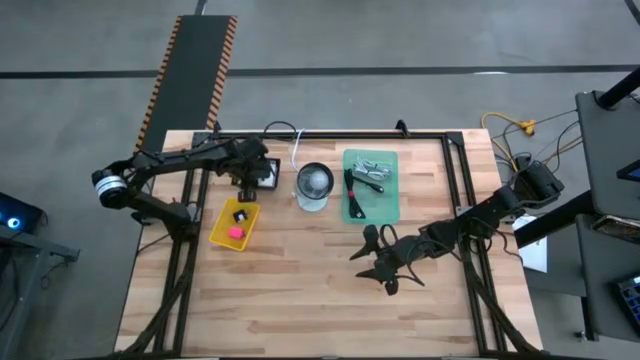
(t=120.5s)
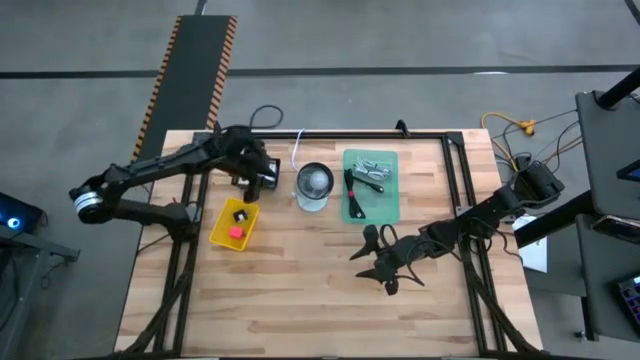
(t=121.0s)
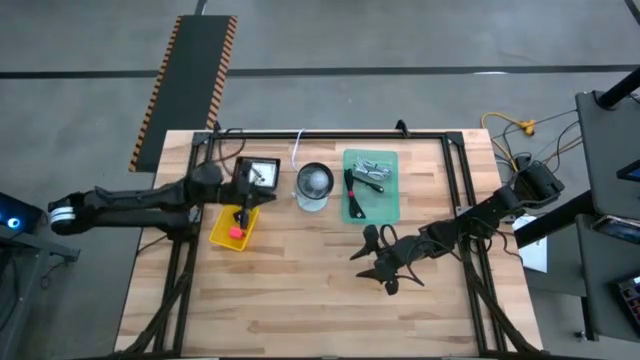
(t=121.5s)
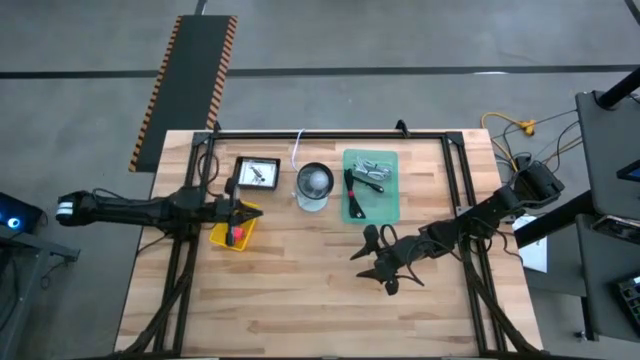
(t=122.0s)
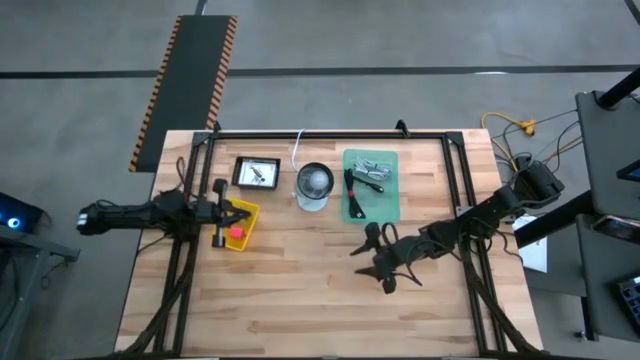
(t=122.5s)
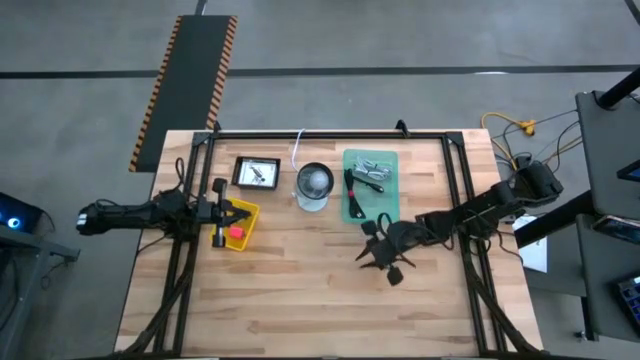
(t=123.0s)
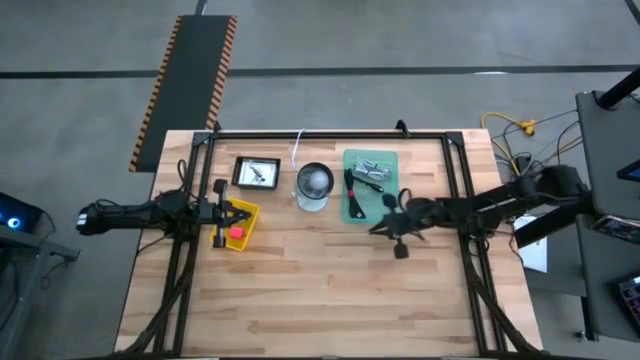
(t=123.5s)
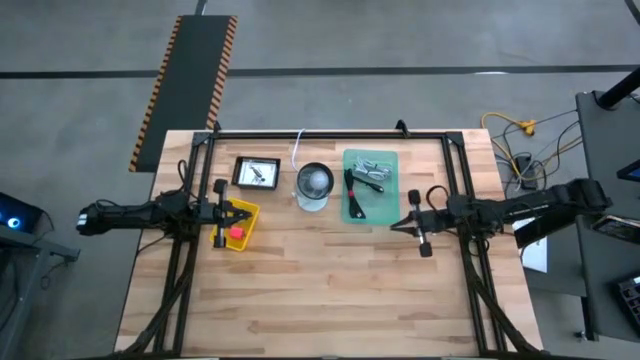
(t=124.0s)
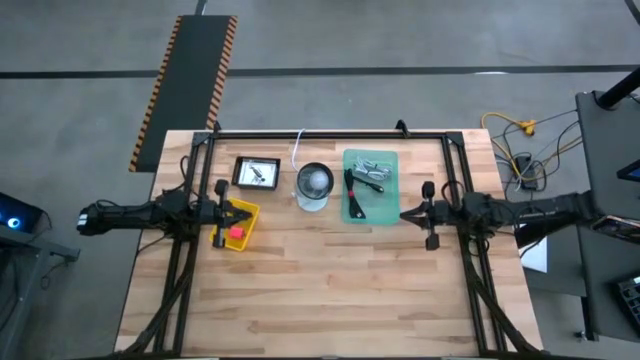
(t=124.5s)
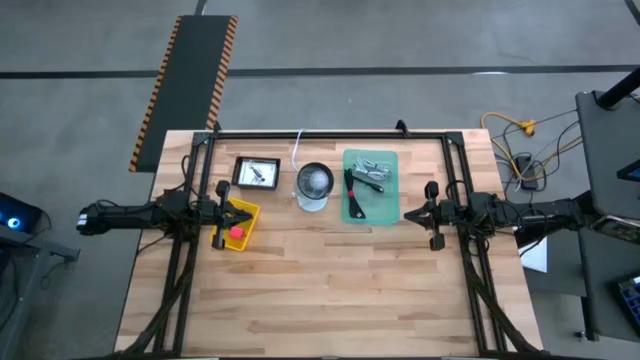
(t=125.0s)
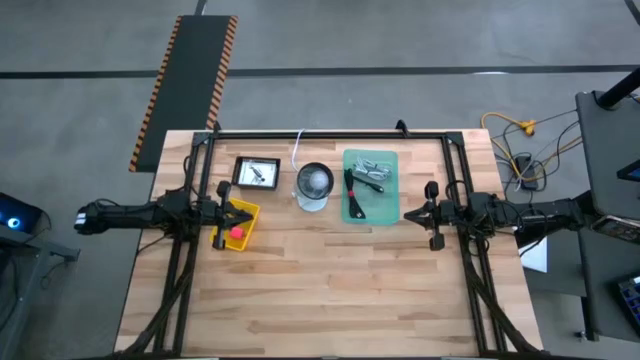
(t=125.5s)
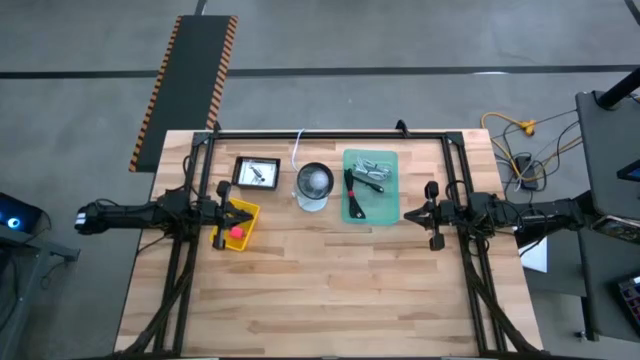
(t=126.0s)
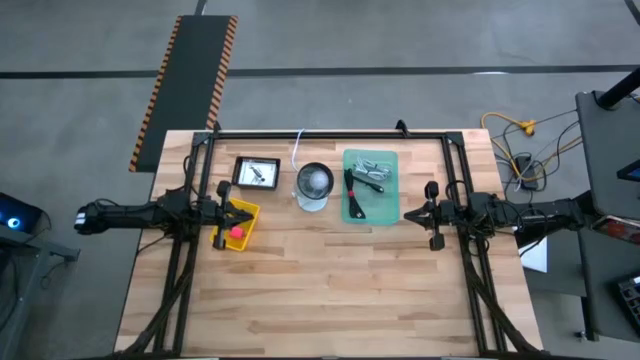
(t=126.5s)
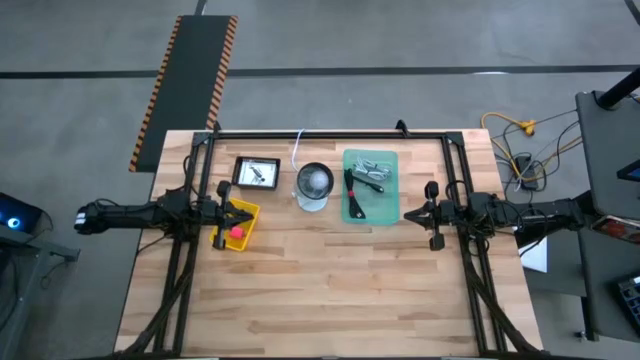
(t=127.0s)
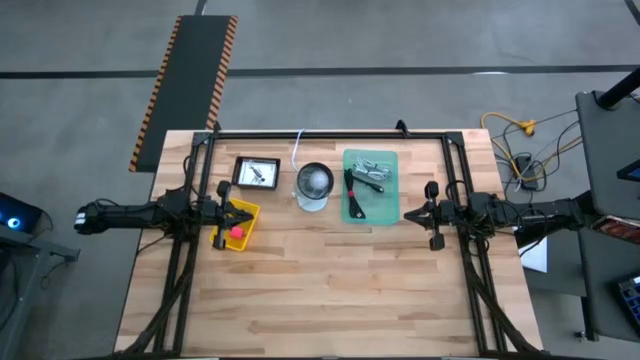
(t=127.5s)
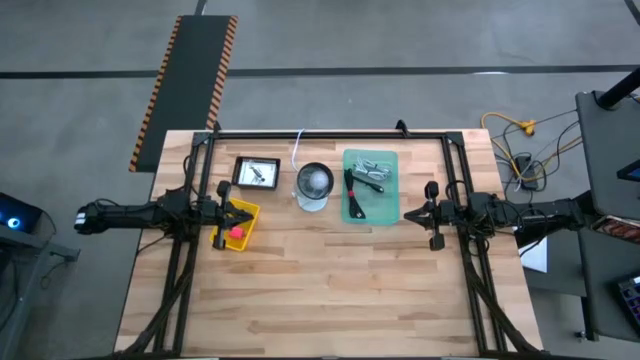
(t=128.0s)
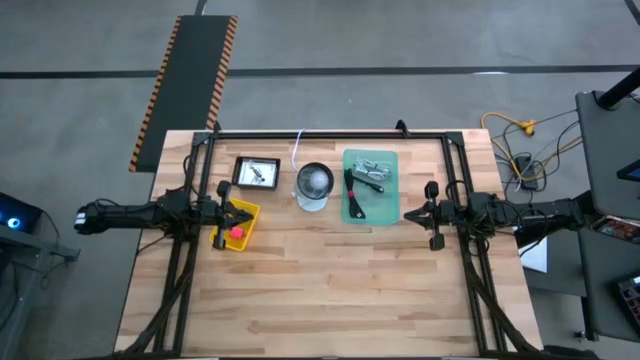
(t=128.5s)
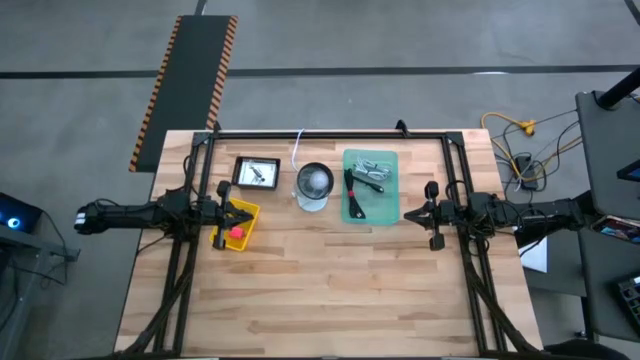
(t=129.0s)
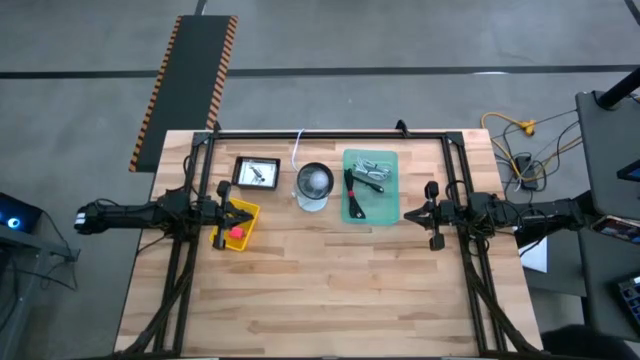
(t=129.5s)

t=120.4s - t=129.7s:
Task: Pick and place items into bin
Return to Home Position

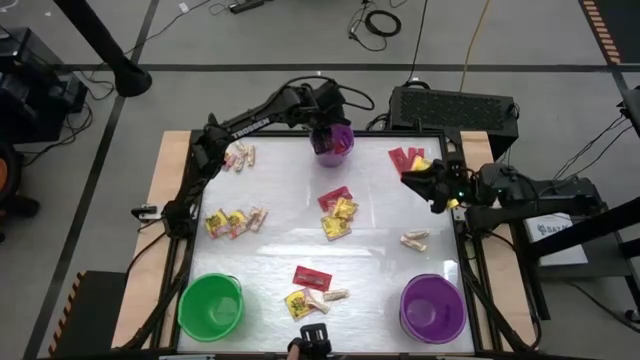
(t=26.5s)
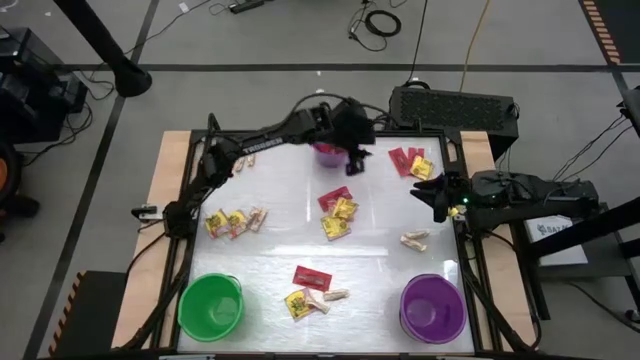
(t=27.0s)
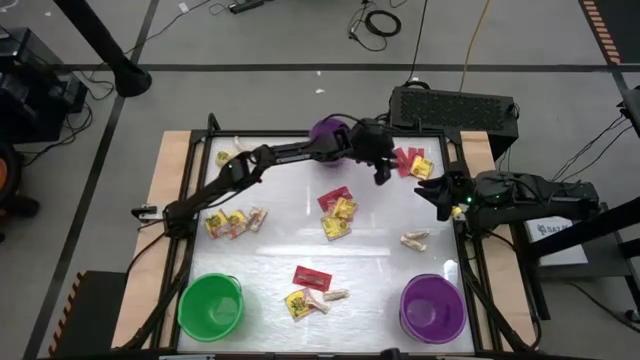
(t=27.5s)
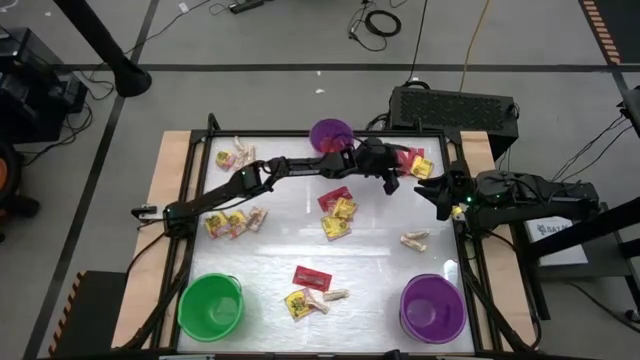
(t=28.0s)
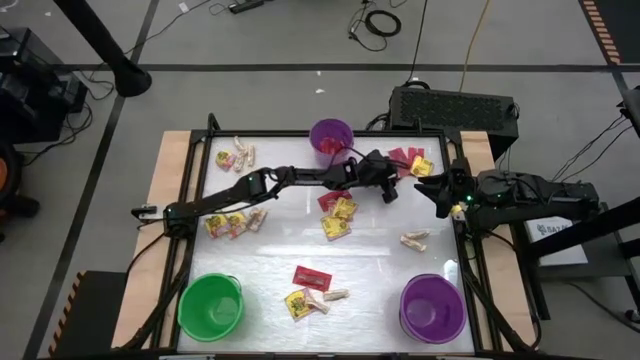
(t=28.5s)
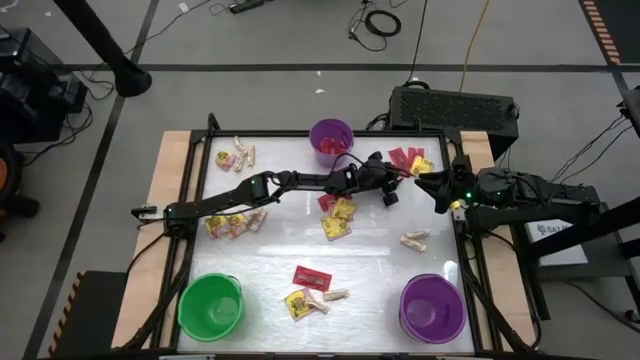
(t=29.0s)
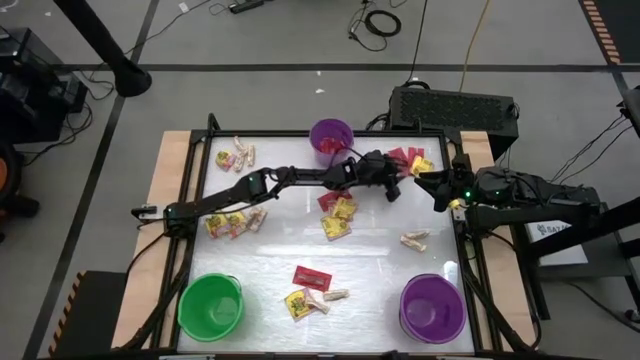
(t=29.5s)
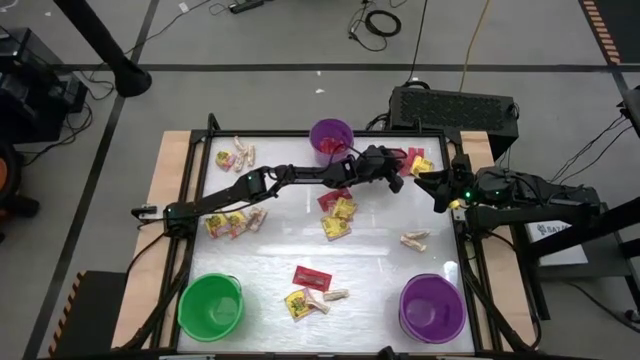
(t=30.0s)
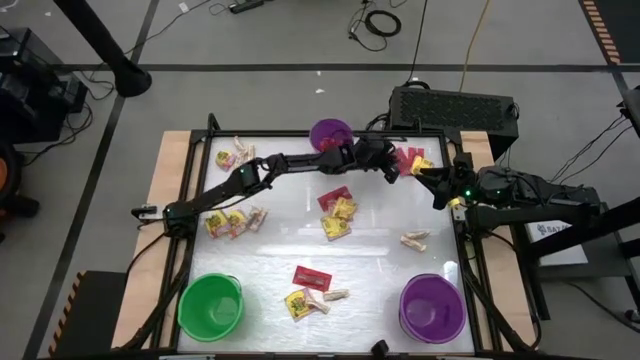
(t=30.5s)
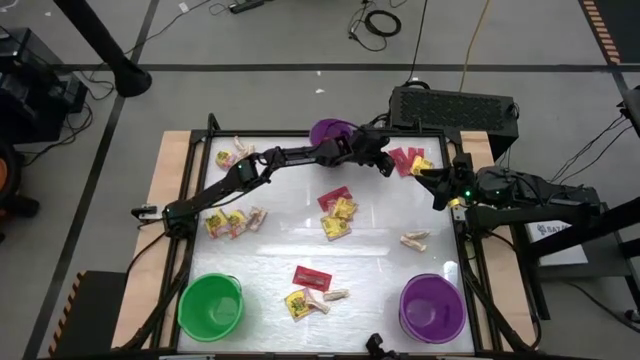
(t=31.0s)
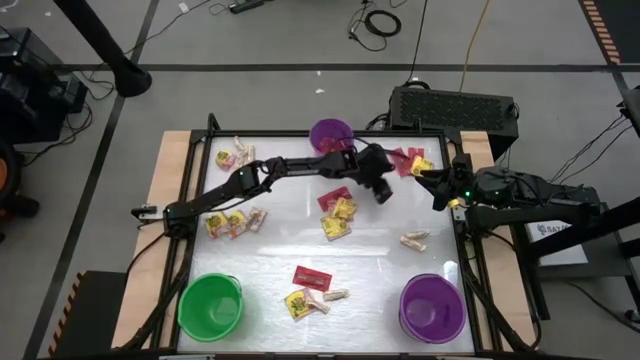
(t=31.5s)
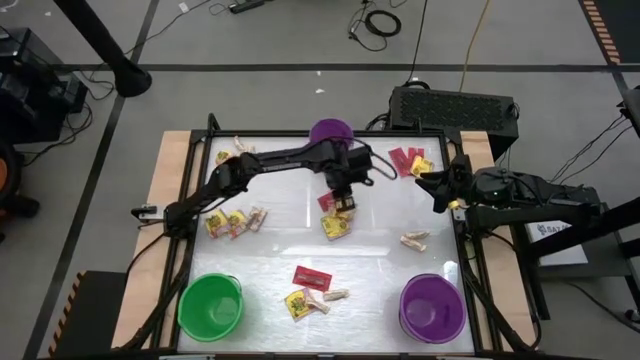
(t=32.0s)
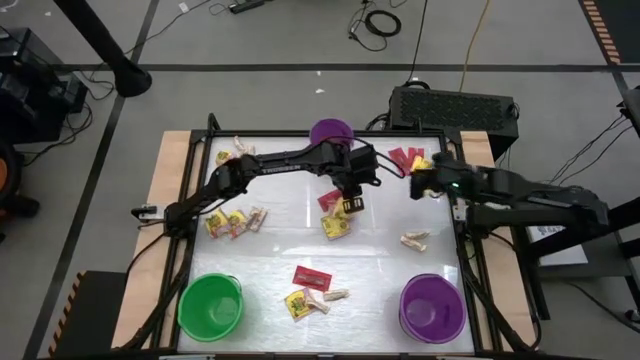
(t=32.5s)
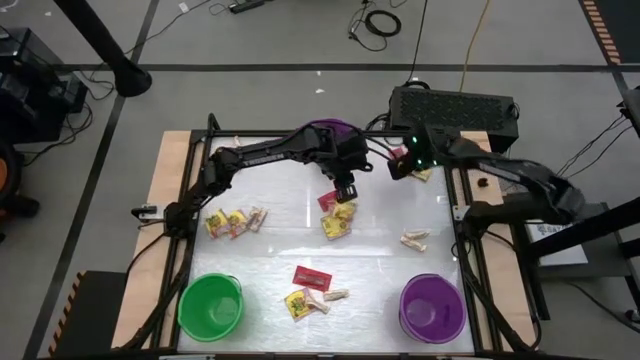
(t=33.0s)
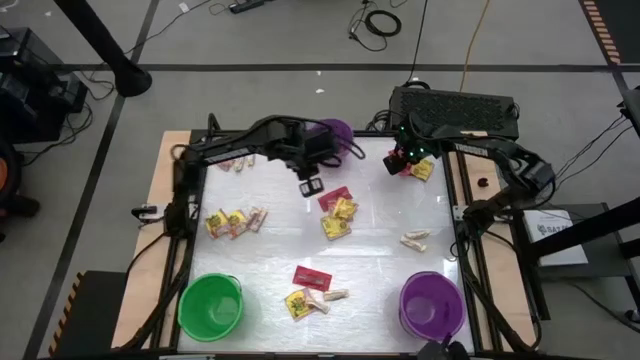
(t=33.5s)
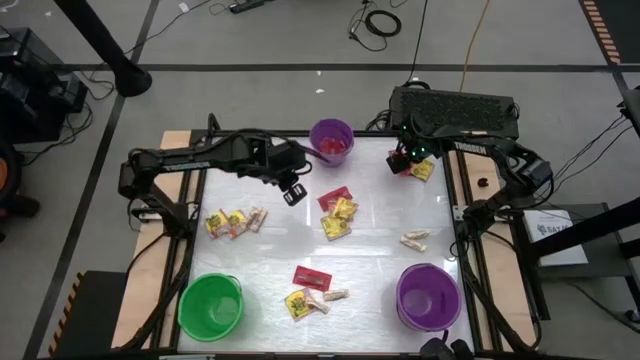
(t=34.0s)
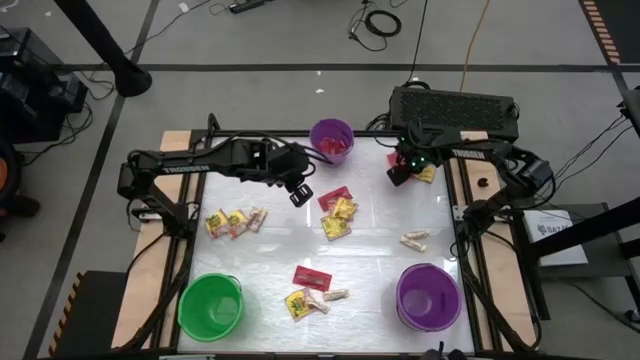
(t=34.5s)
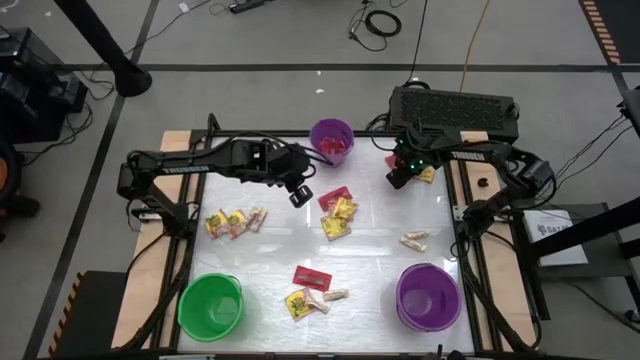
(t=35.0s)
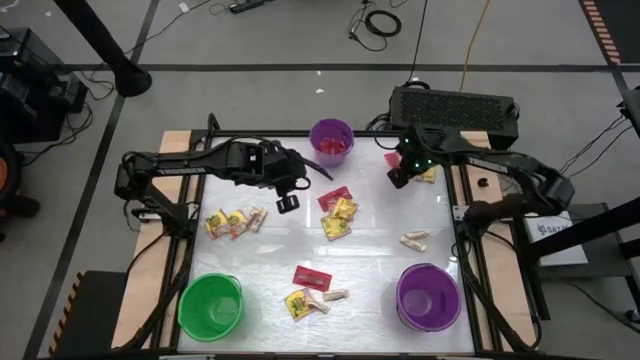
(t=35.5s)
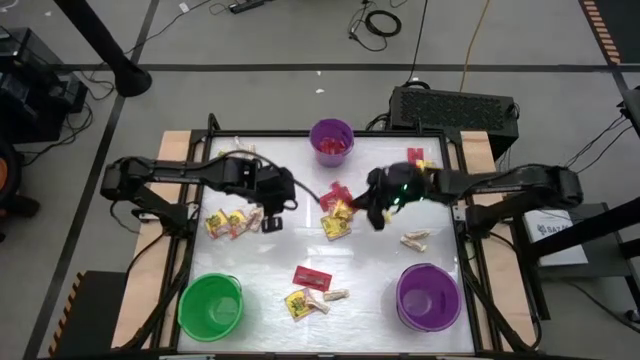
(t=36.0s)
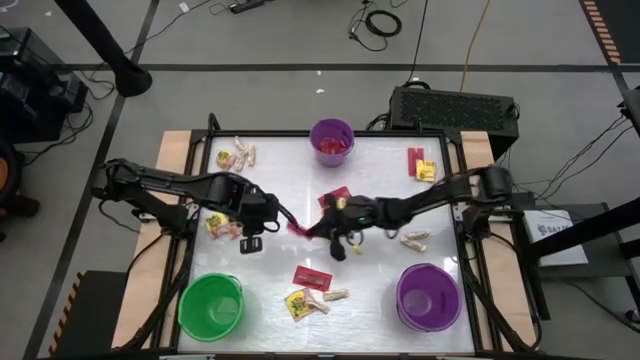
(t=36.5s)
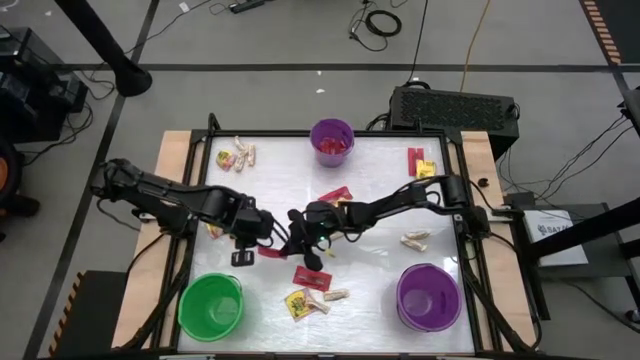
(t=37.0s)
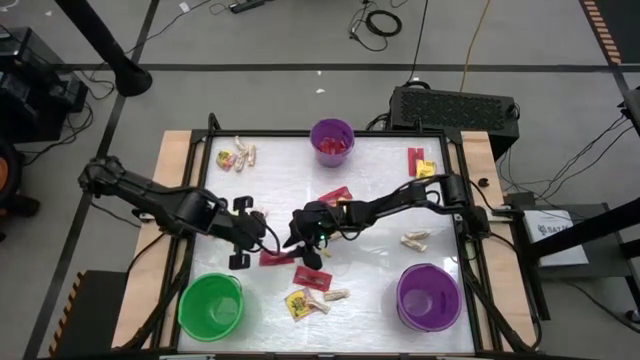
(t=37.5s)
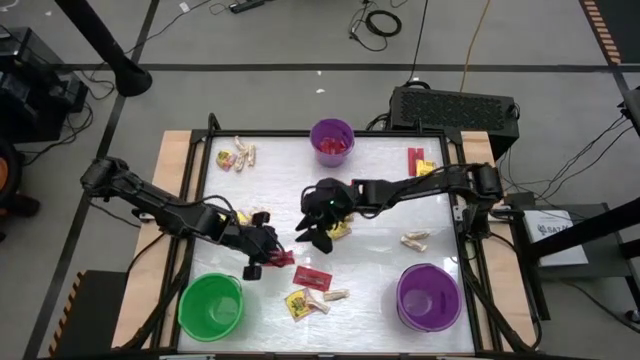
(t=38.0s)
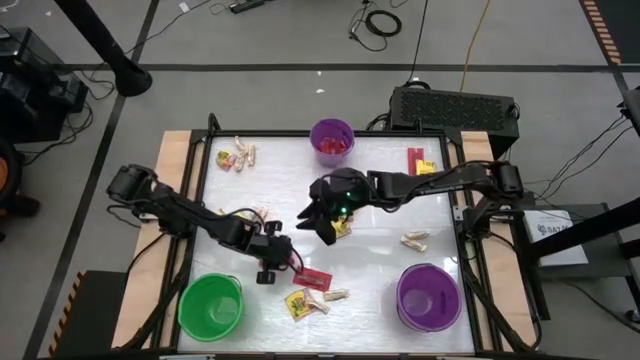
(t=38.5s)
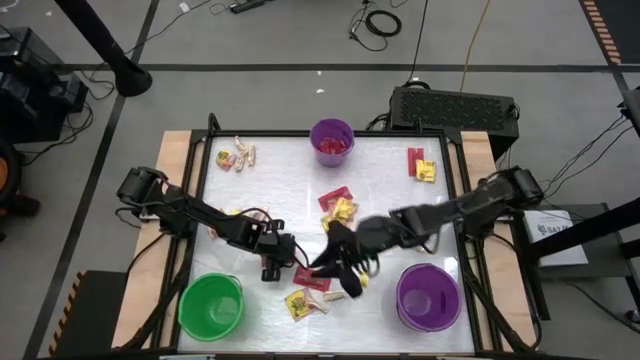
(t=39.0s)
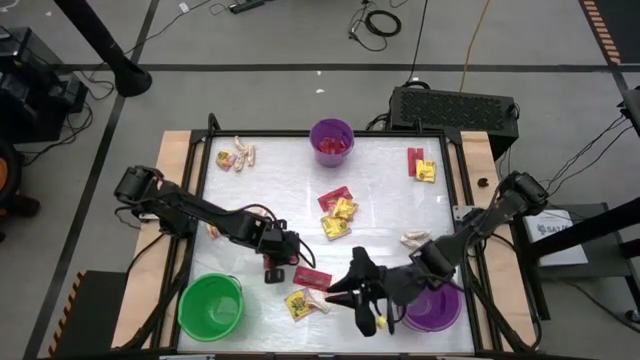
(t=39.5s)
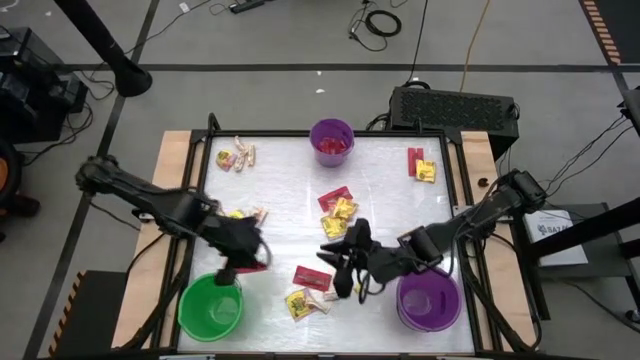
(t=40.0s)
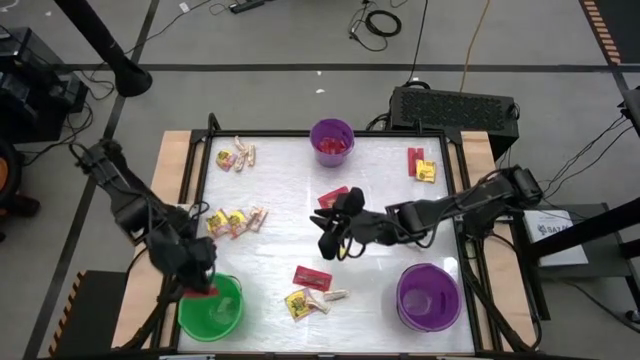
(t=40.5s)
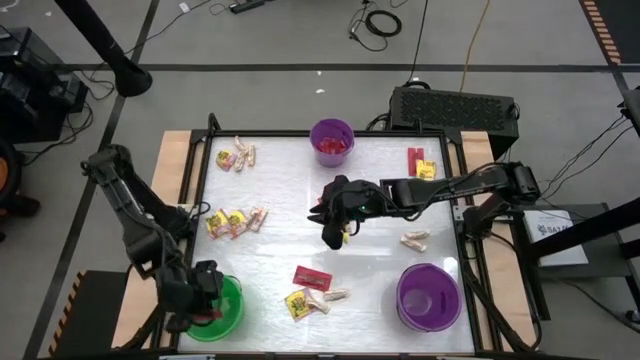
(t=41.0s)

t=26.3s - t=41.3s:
Task: Sort candy by brand, put in halloween buckets
Put the red candy into the green bucket
